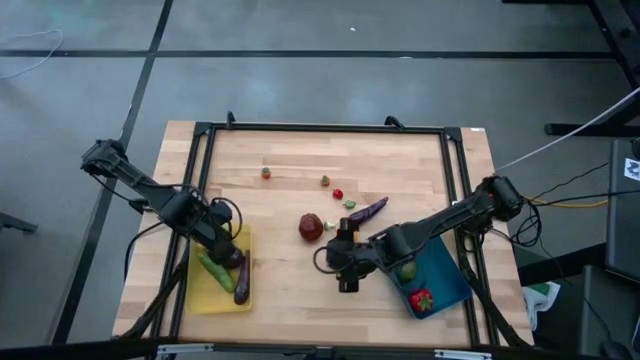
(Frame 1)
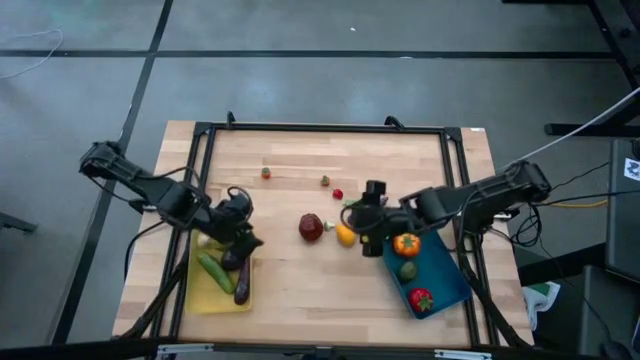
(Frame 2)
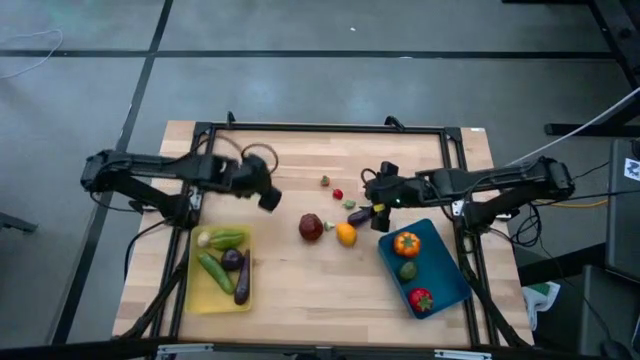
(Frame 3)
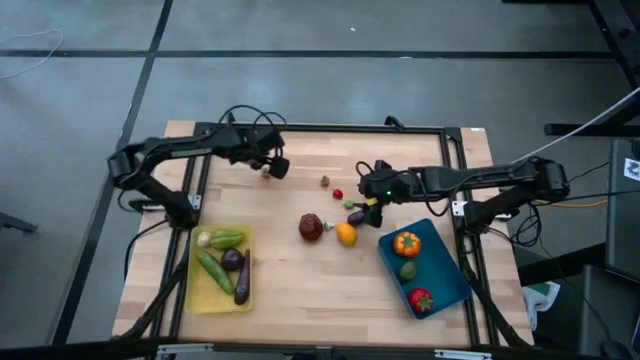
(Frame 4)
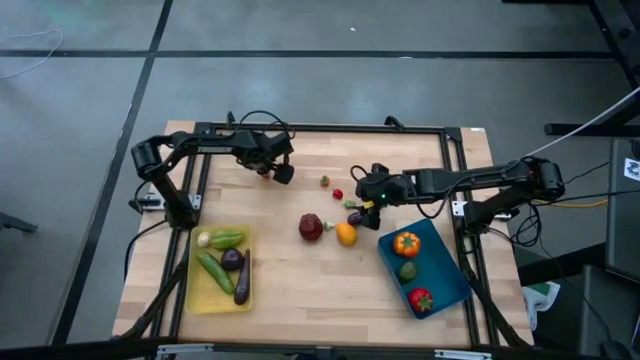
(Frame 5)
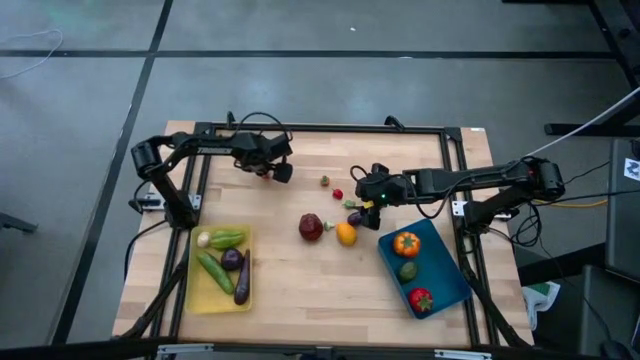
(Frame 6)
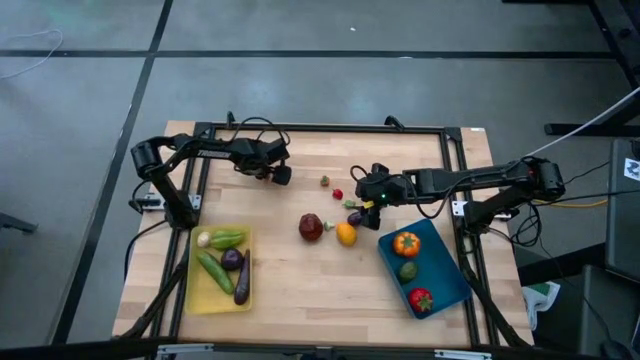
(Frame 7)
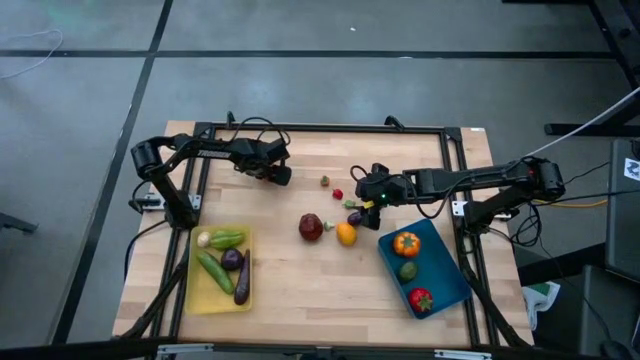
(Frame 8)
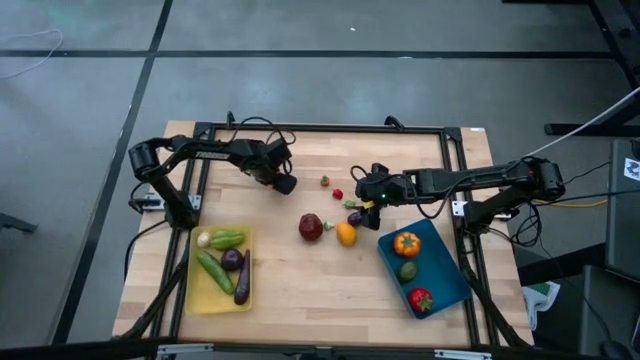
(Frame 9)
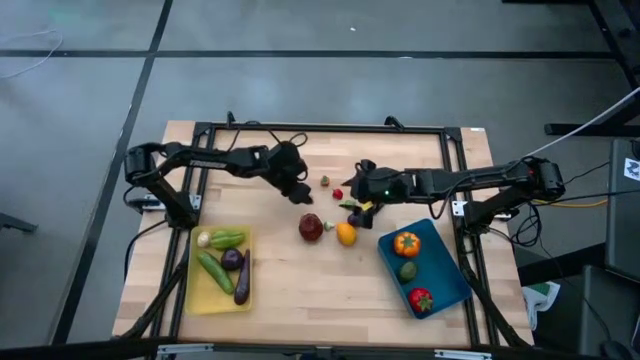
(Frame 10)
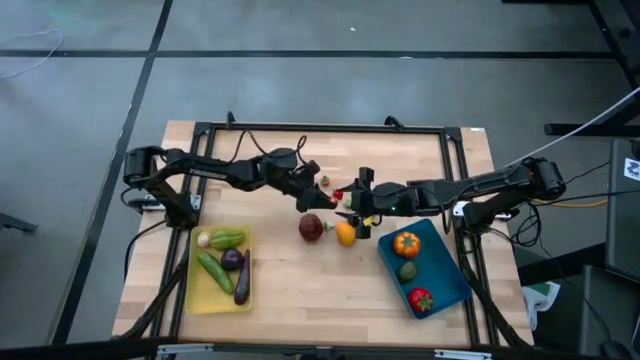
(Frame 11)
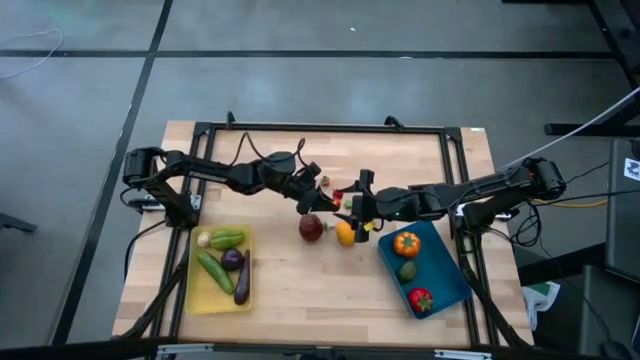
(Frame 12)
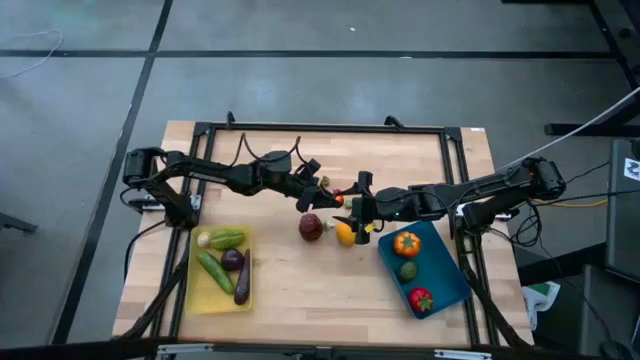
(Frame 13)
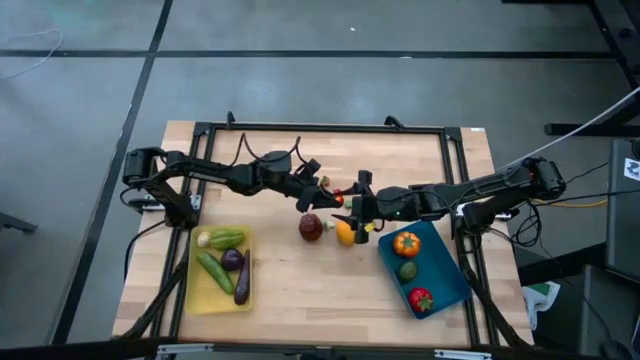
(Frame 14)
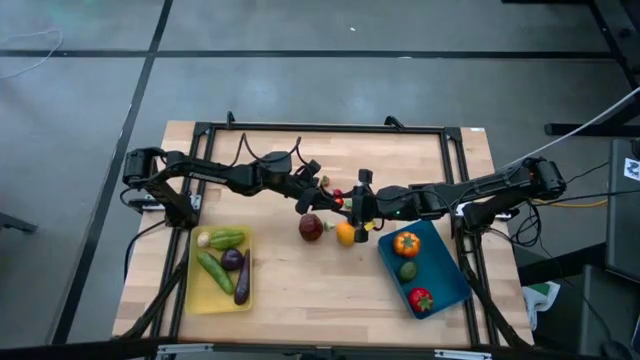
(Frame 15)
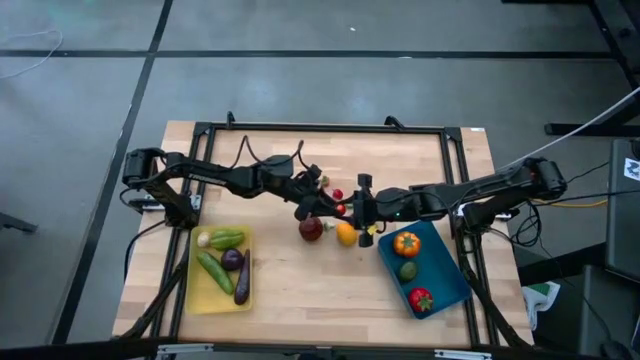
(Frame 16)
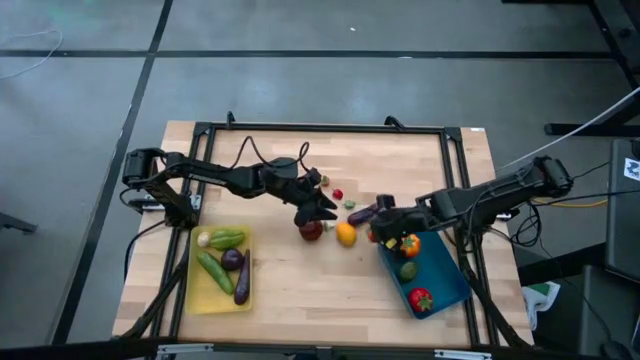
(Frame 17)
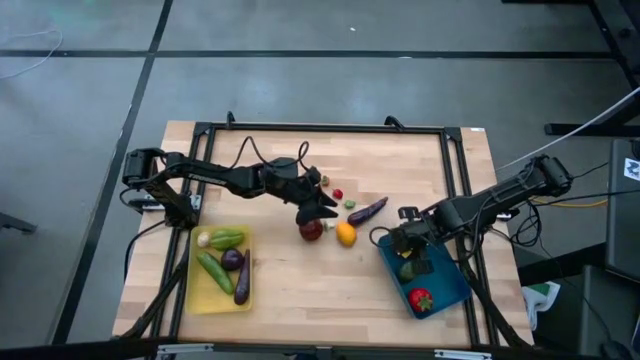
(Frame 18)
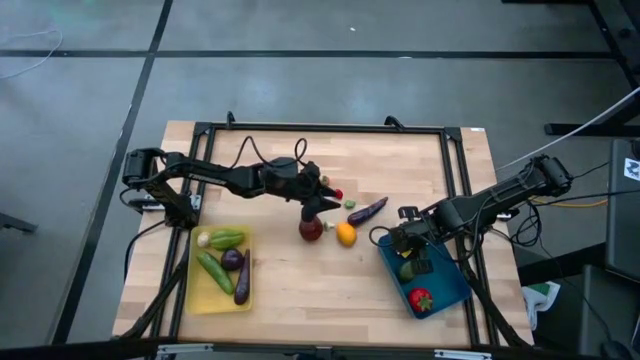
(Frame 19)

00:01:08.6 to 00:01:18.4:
Task: Sort produce into baskets
Put the left peach into the blue bin

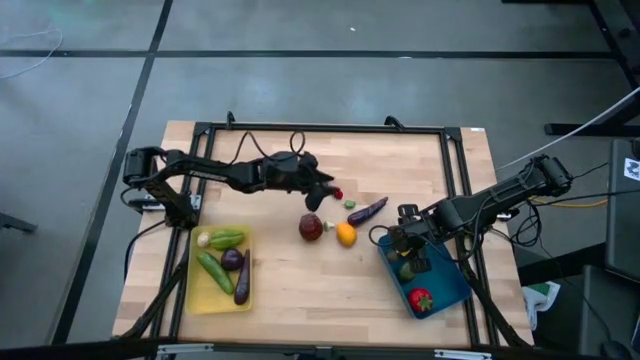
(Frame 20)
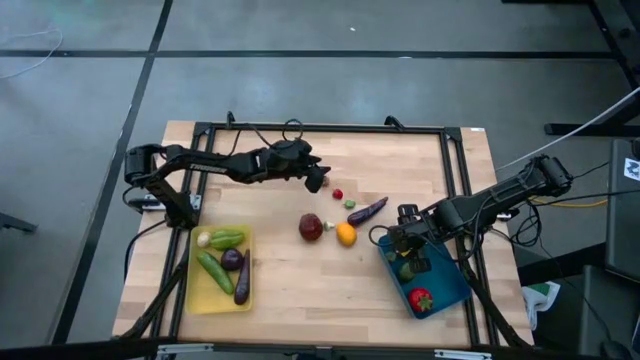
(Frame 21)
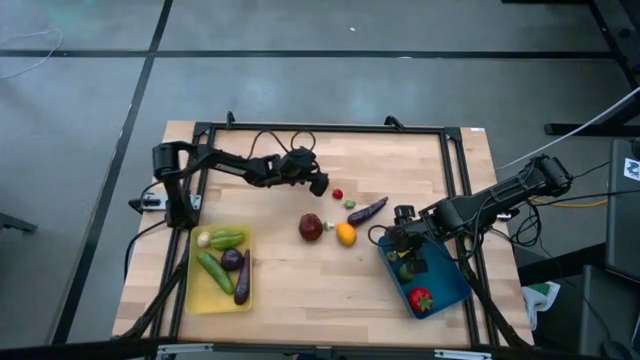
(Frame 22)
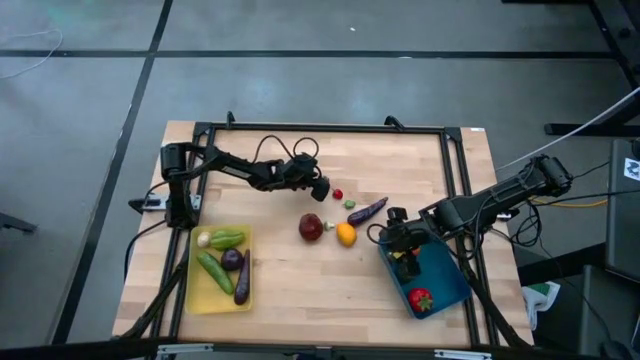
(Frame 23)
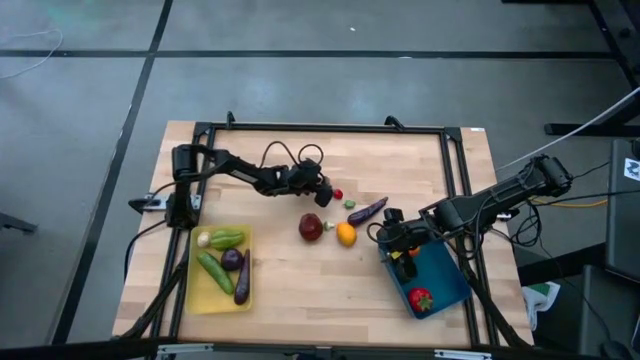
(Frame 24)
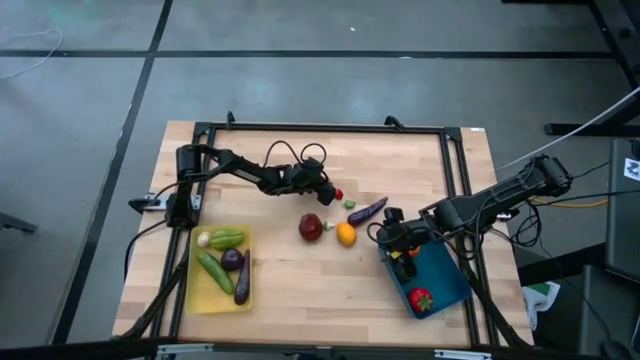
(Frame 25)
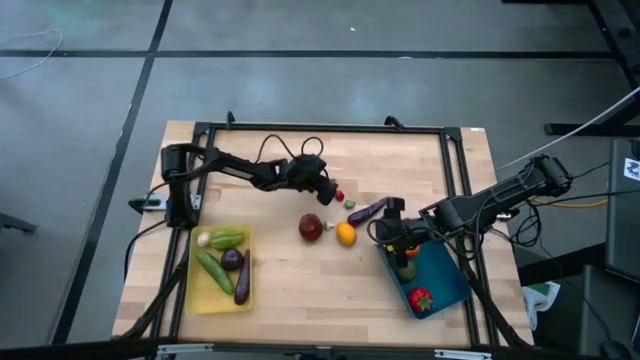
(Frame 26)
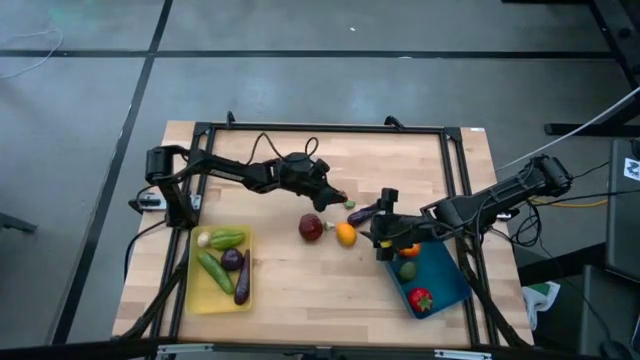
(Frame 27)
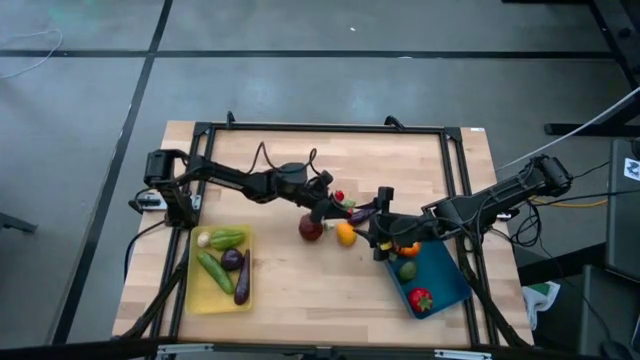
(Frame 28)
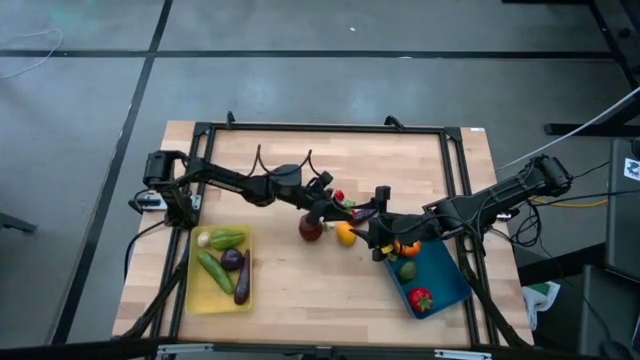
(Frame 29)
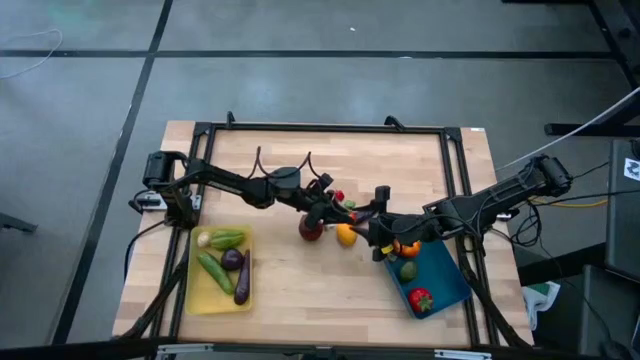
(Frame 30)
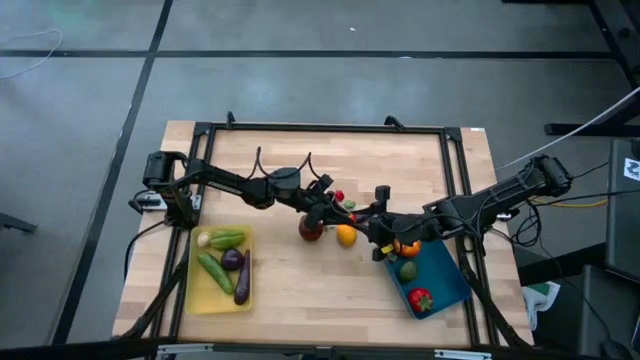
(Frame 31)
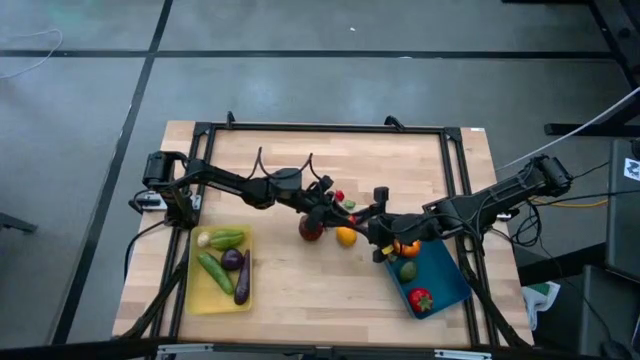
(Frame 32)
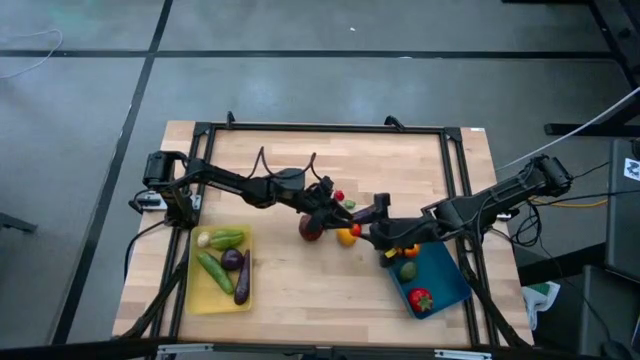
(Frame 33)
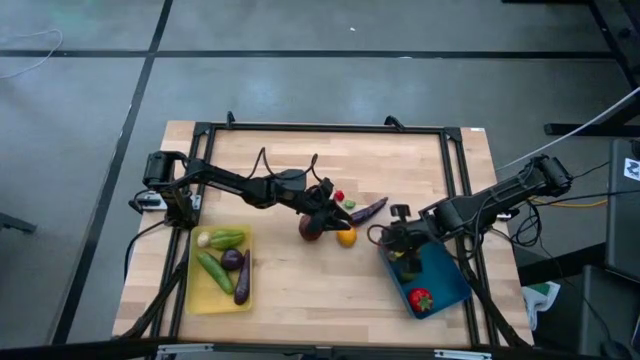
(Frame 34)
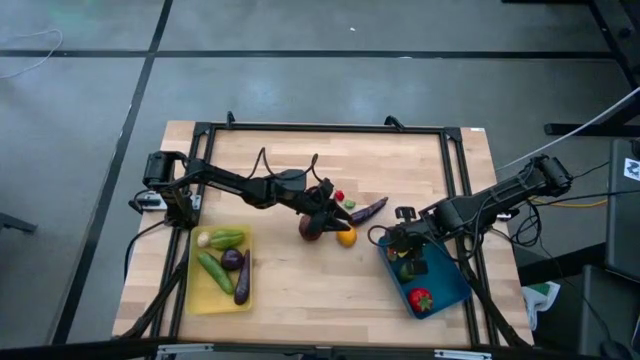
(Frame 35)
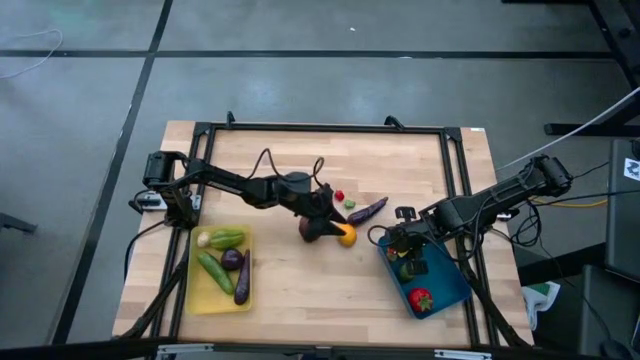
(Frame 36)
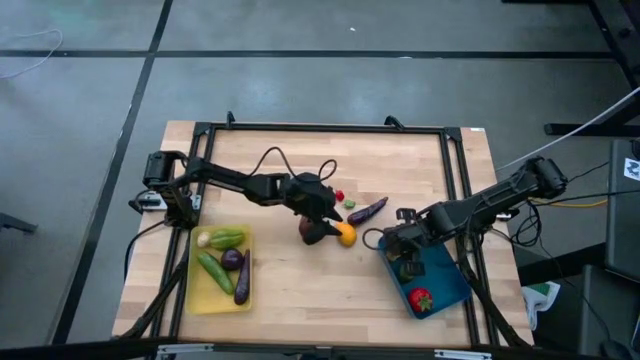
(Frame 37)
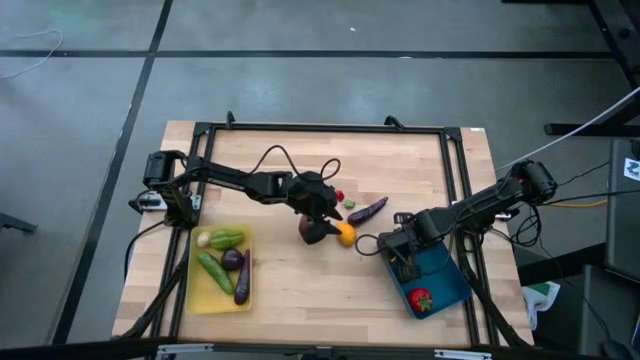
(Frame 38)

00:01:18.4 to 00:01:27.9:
Put the peach into the blue bin

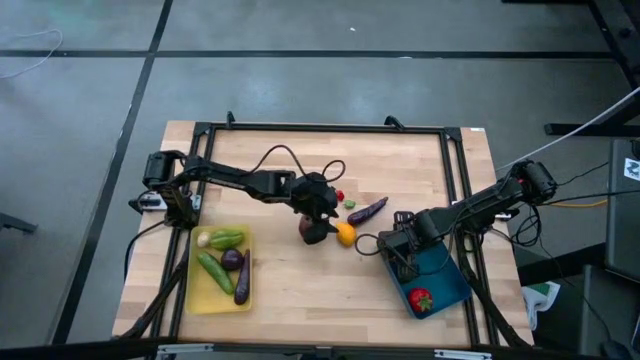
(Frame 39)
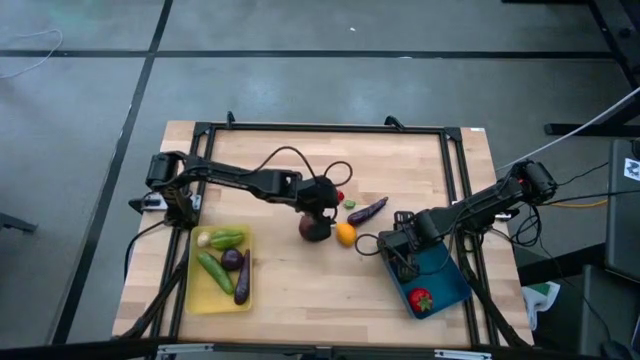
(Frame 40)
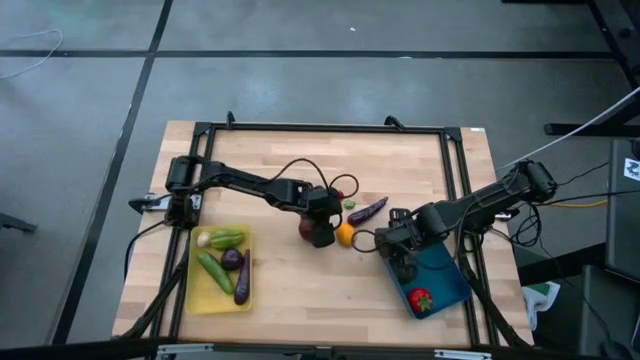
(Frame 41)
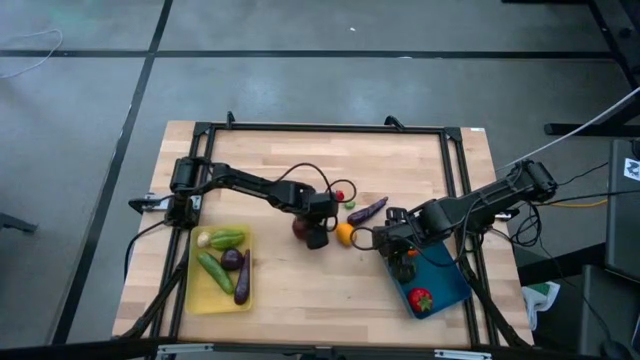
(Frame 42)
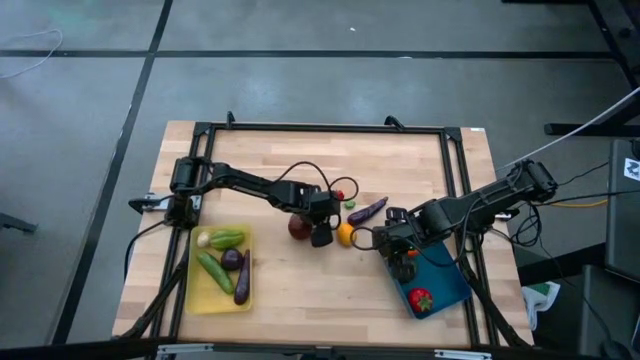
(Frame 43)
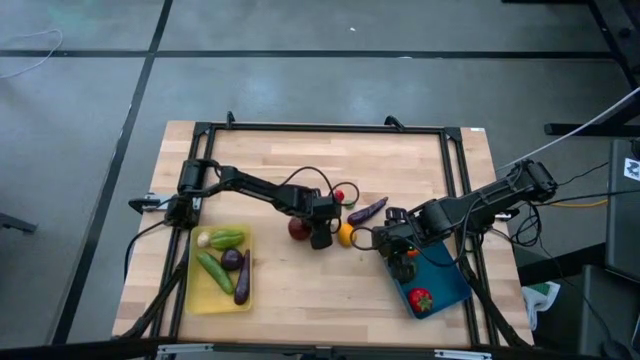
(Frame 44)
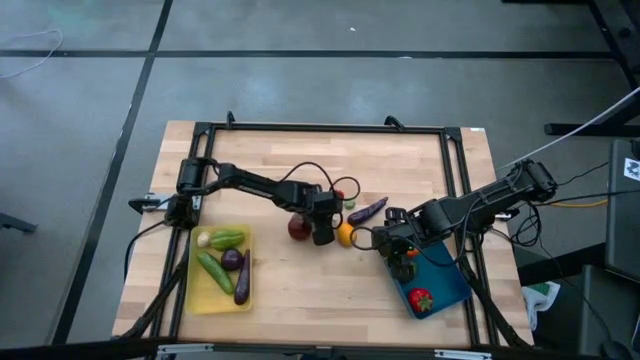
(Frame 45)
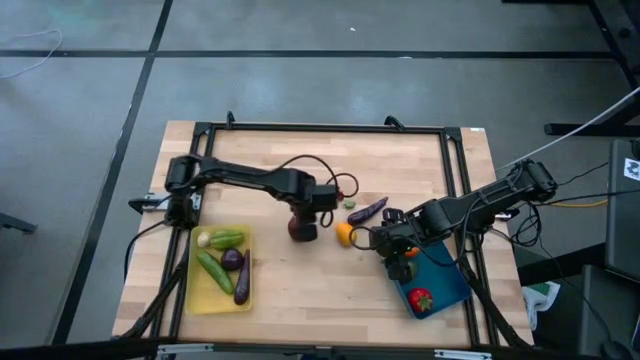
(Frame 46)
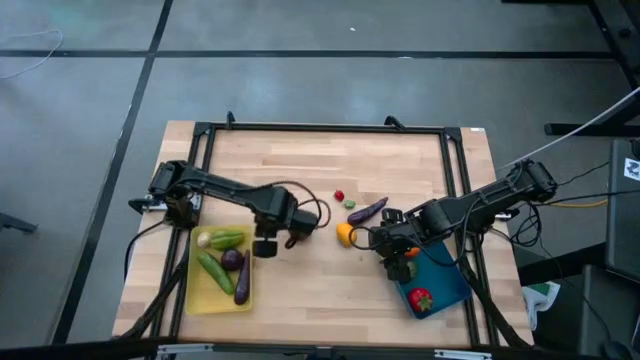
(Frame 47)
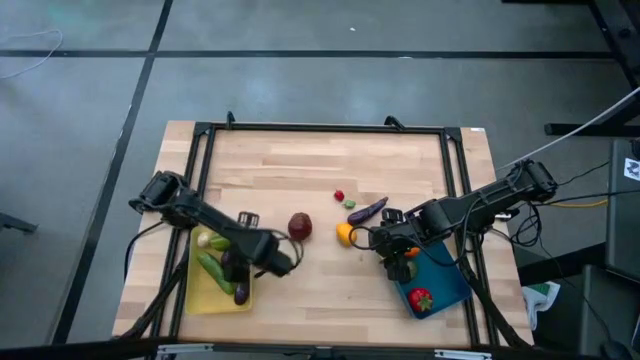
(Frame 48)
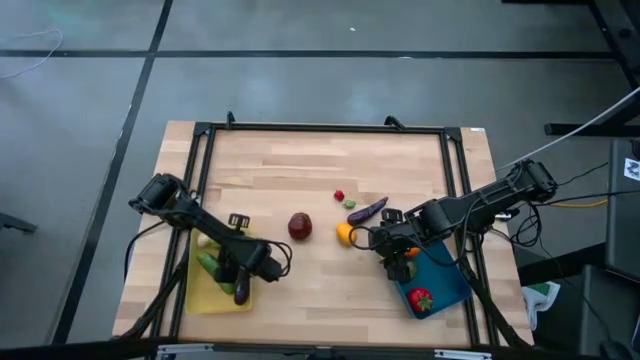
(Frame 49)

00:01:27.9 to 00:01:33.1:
Put the green mushroom into the yellow bin
